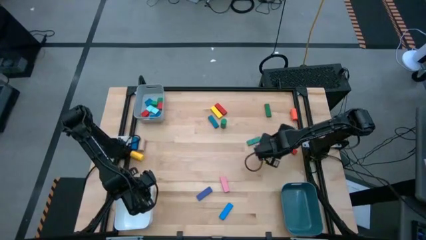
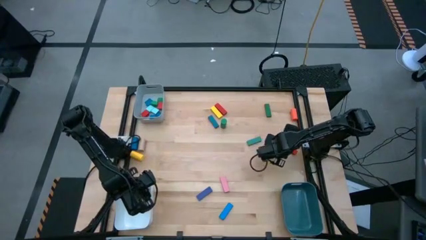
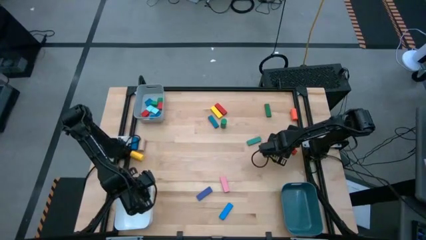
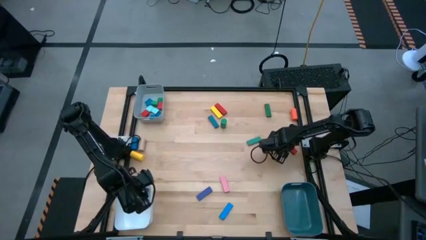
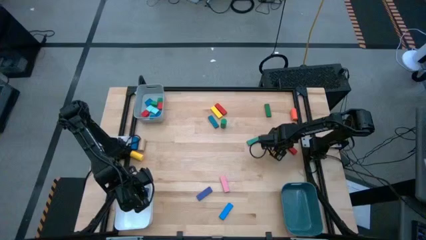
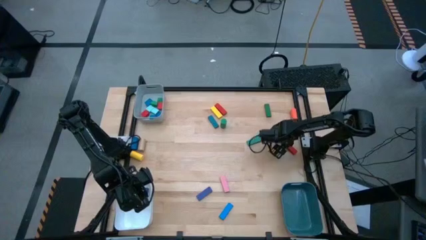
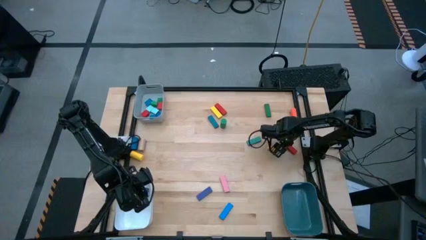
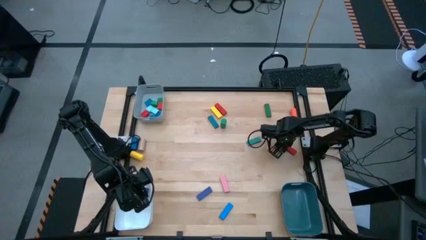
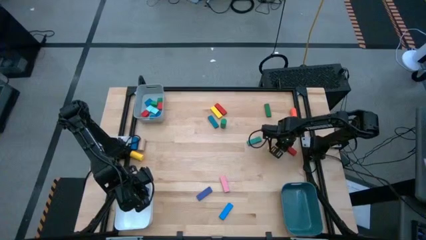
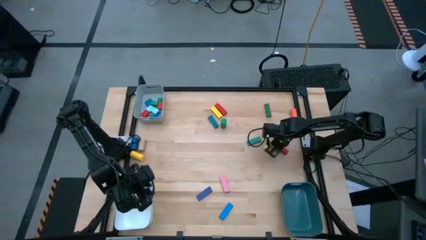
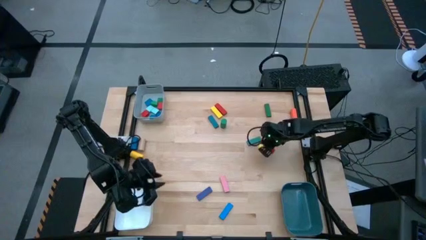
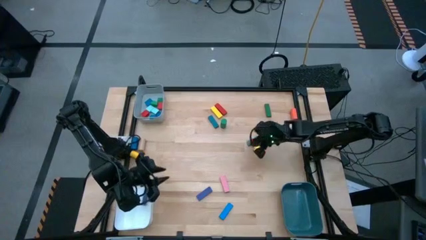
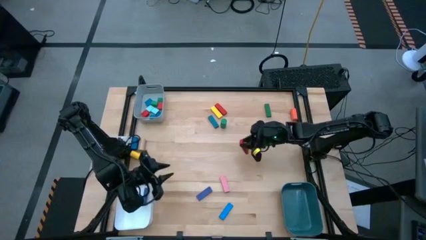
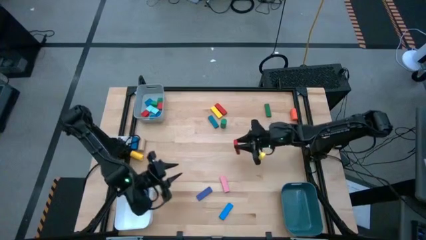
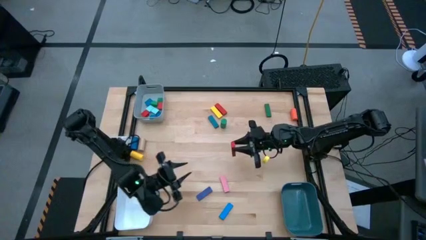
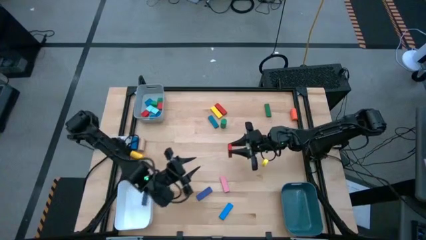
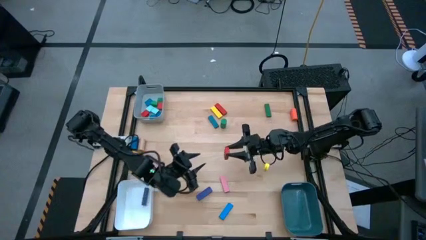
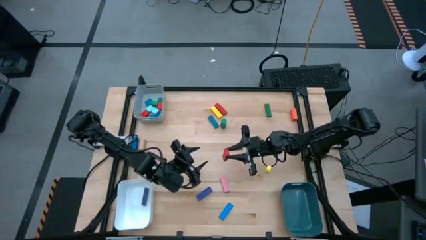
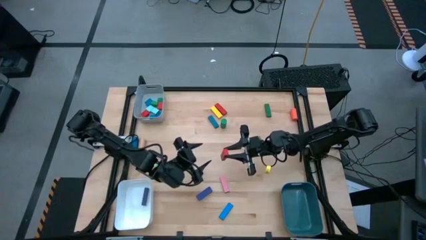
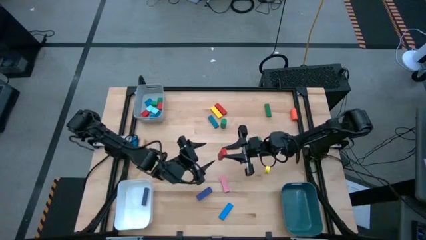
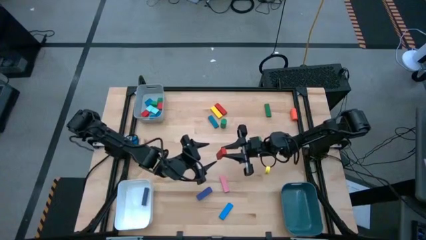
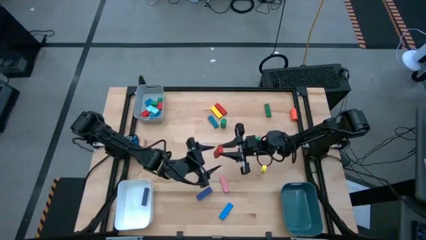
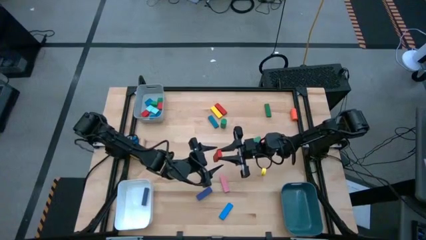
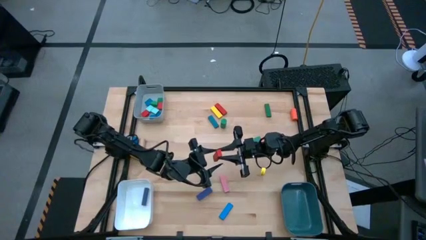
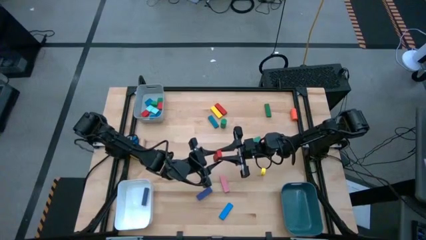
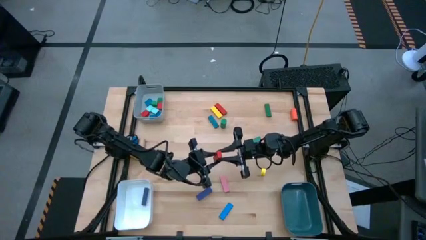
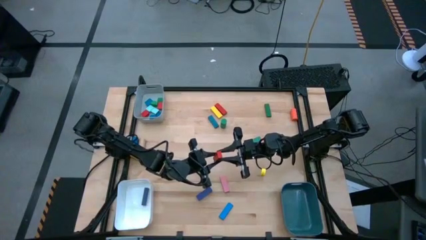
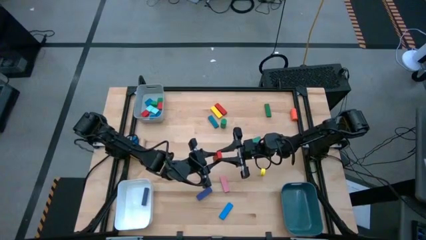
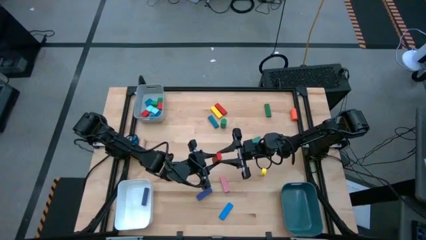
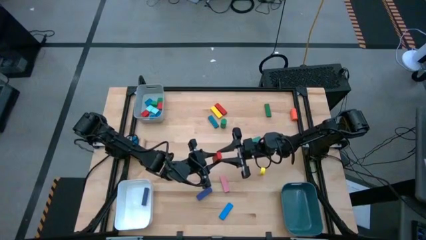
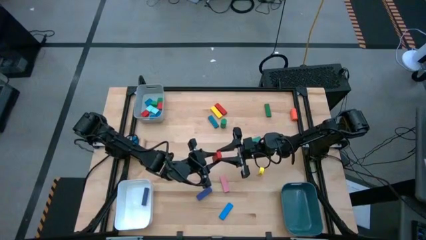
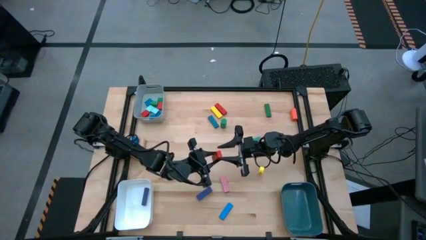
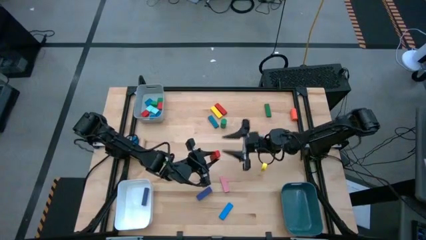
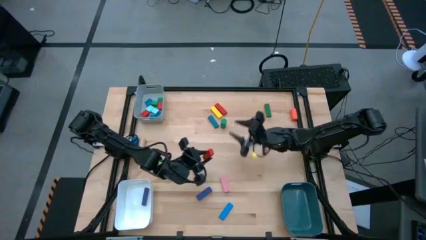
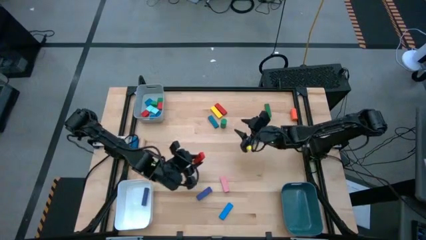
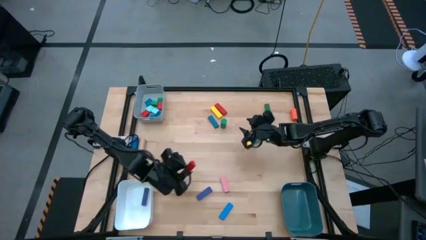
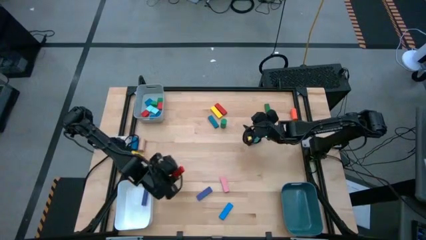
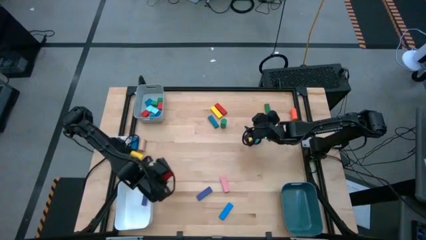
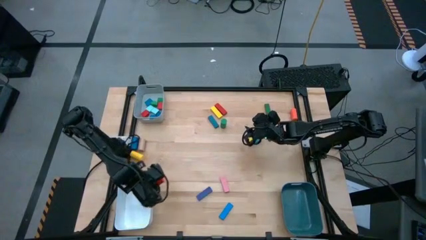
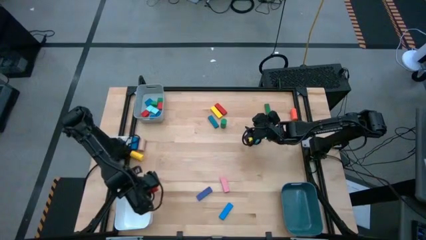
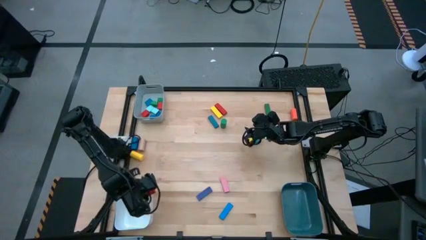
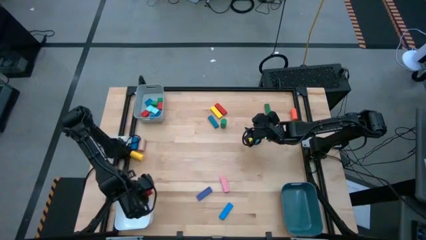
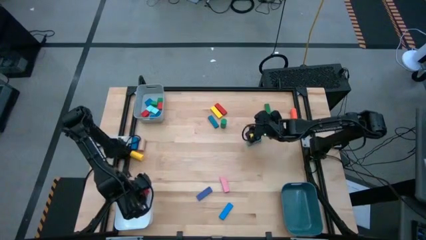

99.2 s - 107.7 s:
Task: Sort blocks by size
Put the red rectangular block into the white bin

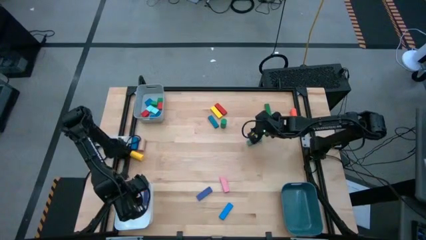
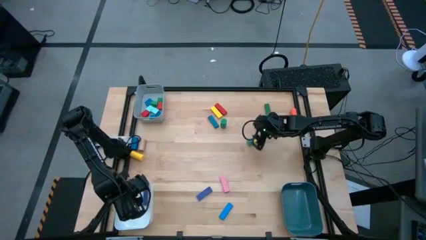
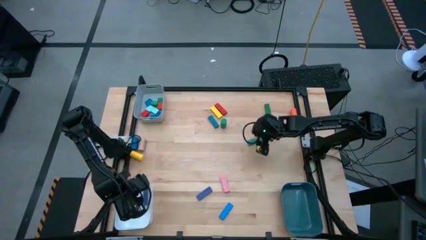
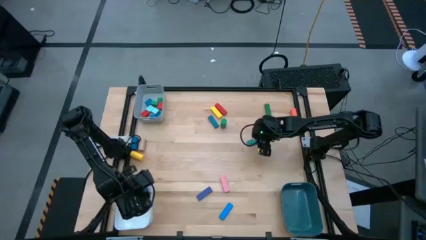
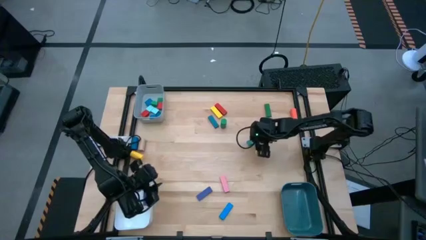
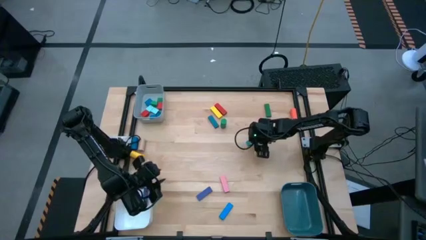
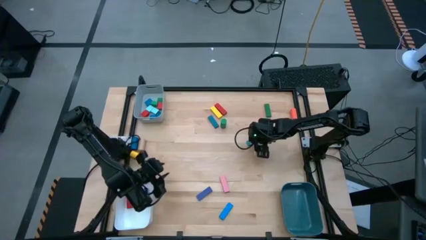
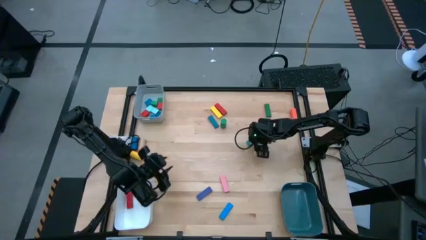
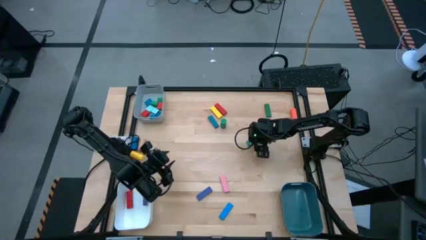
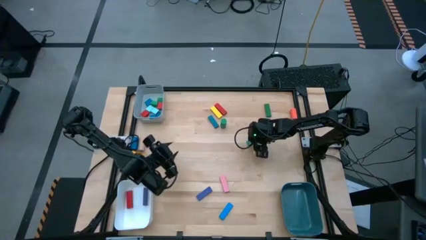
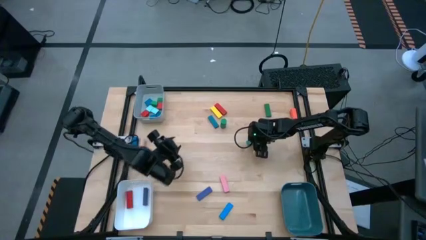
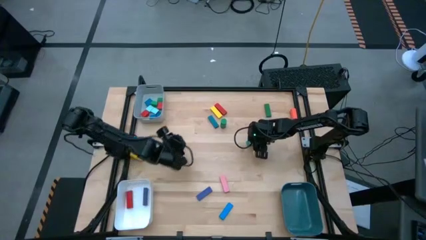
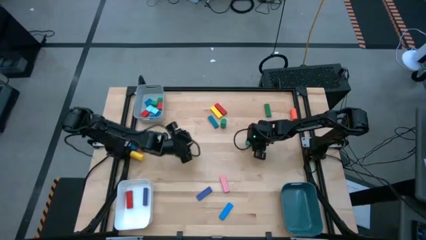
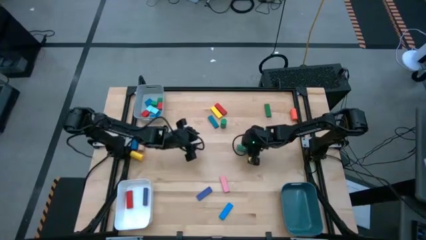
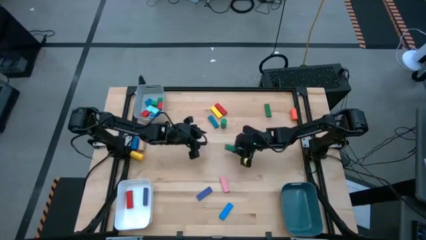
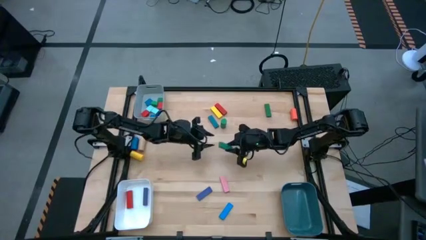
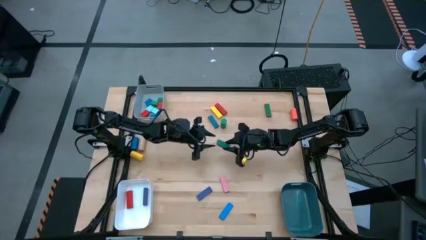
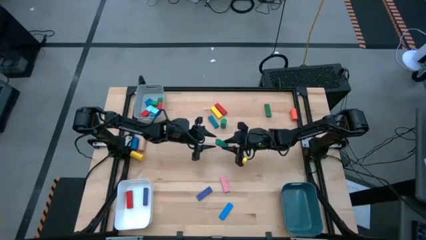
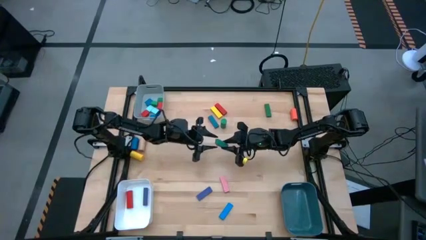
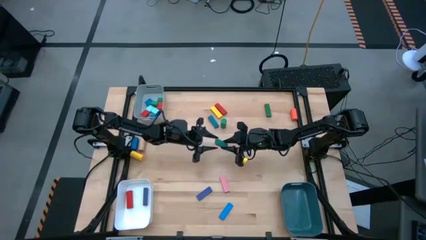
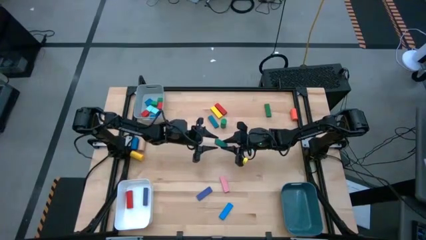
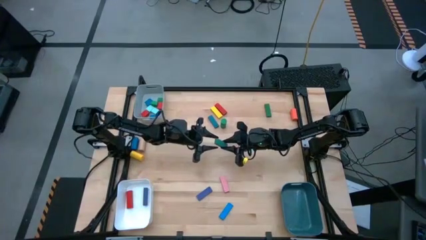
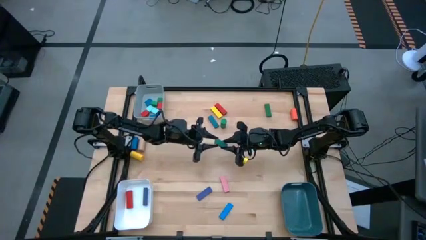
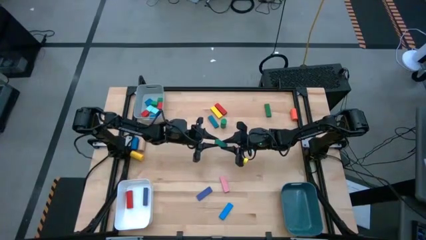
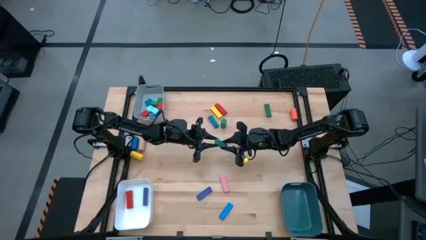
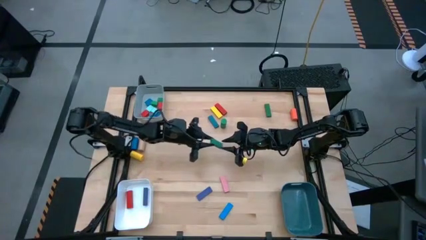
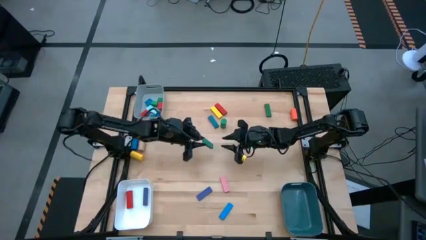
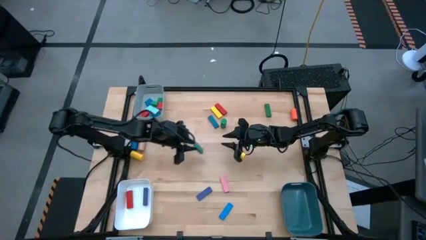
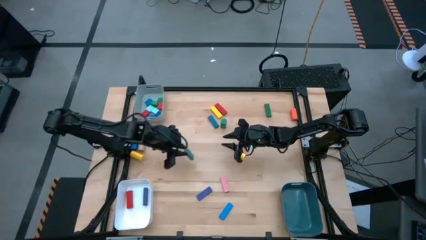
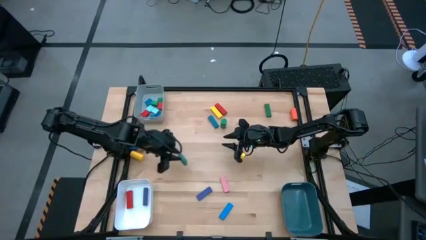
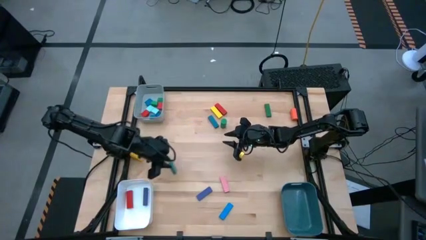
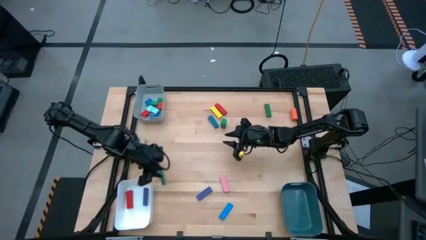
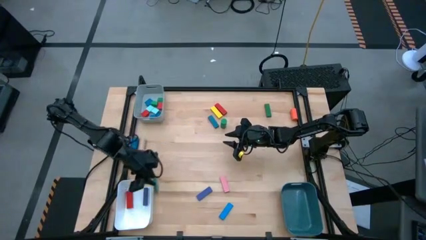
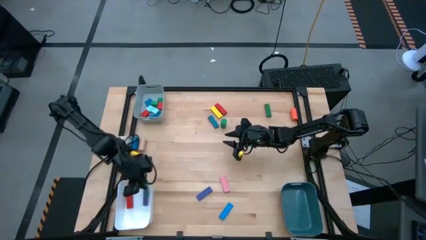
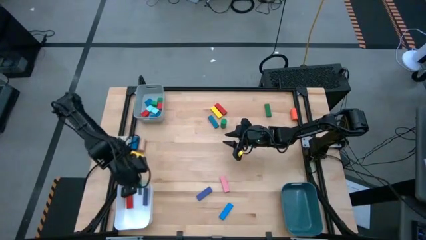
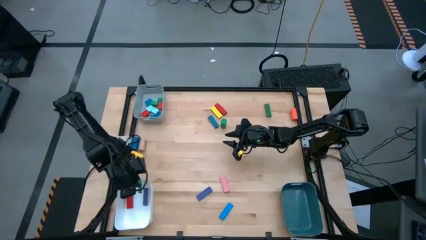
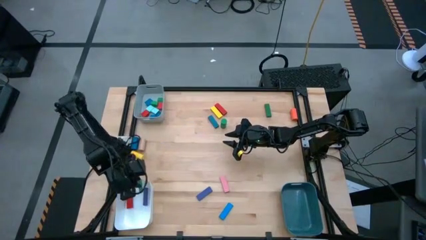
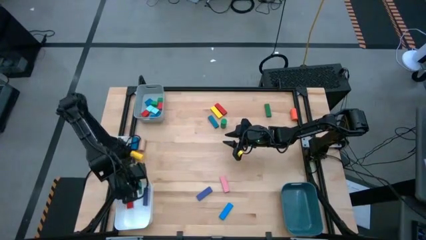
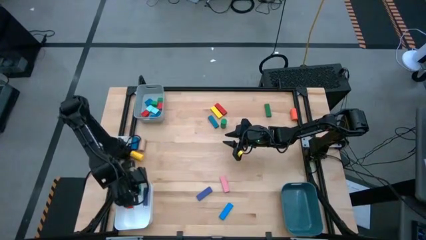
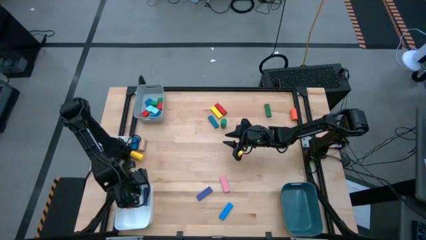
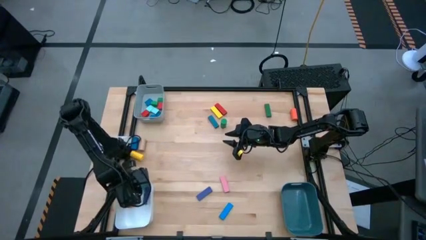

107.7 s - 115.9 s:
Put the light green rectangular block into the white bin
